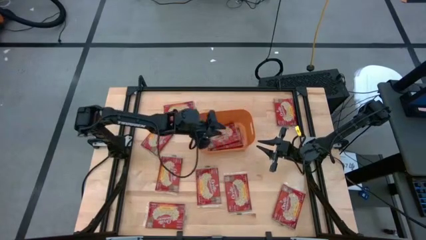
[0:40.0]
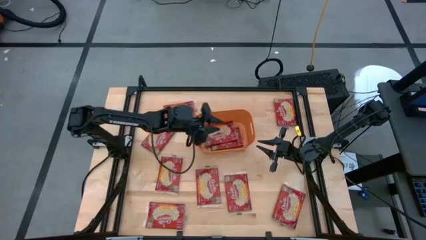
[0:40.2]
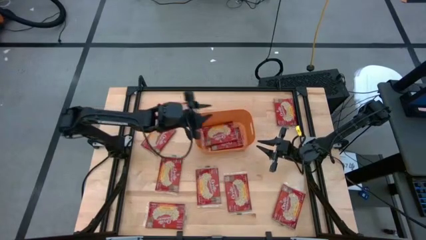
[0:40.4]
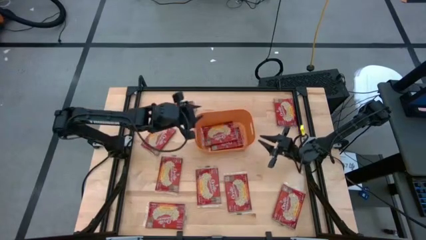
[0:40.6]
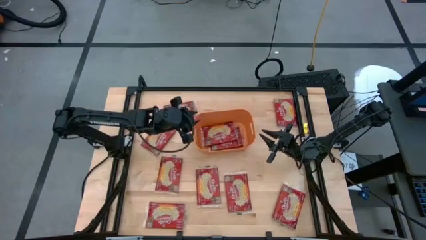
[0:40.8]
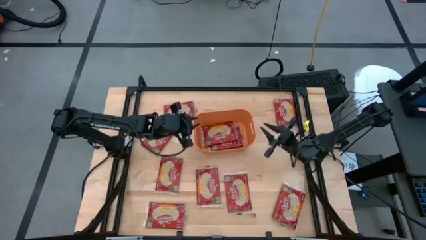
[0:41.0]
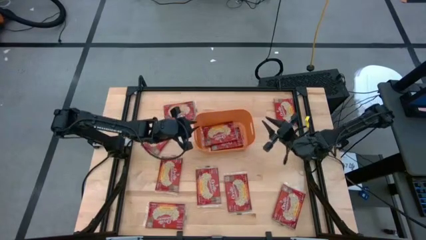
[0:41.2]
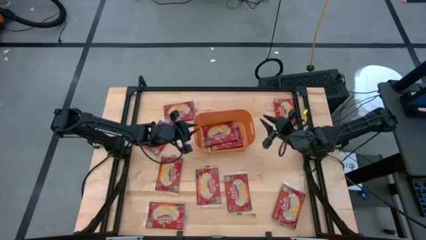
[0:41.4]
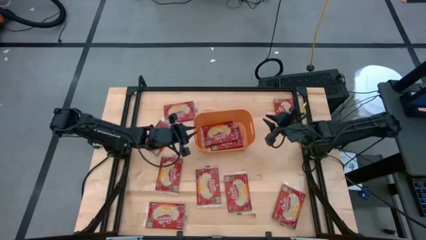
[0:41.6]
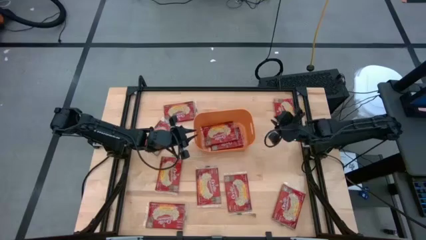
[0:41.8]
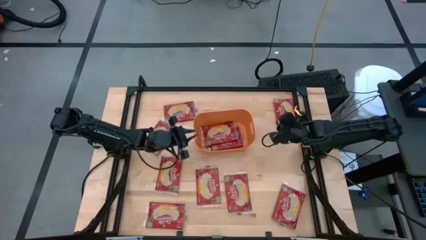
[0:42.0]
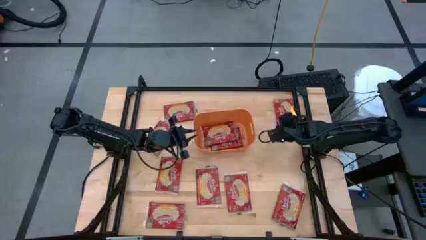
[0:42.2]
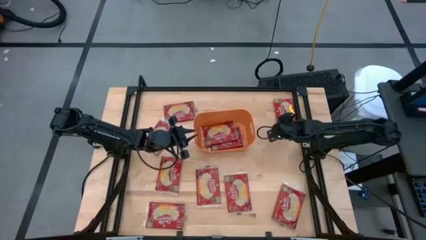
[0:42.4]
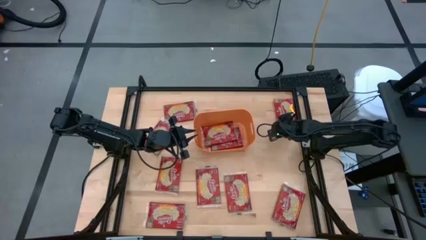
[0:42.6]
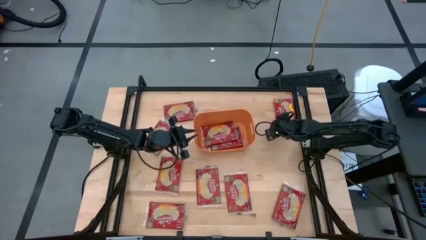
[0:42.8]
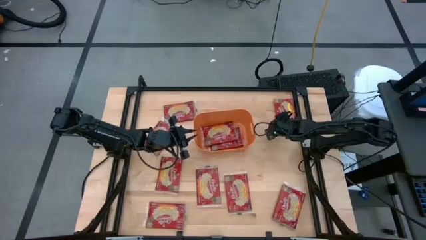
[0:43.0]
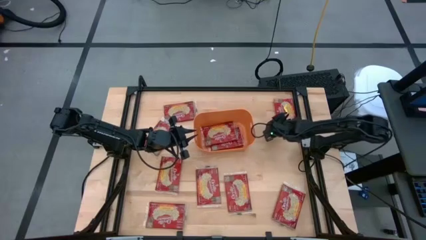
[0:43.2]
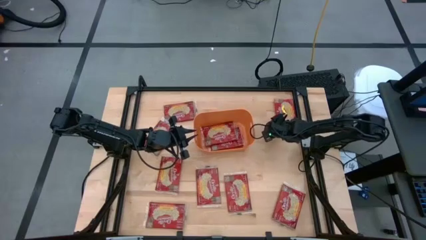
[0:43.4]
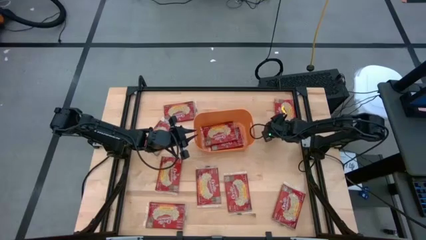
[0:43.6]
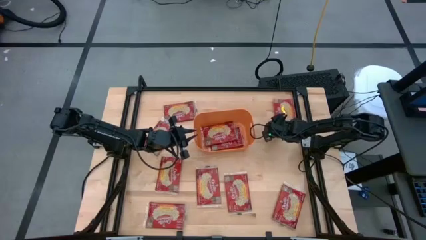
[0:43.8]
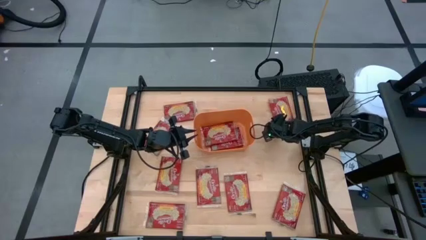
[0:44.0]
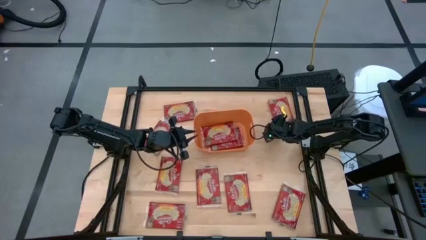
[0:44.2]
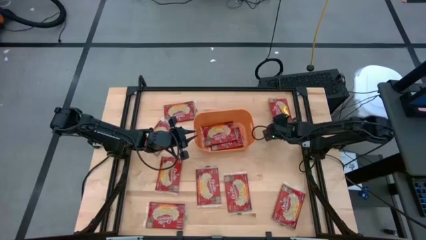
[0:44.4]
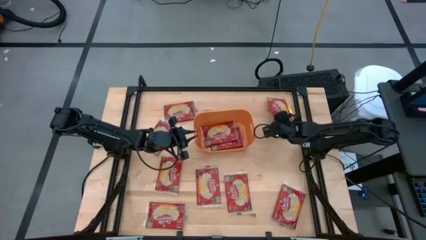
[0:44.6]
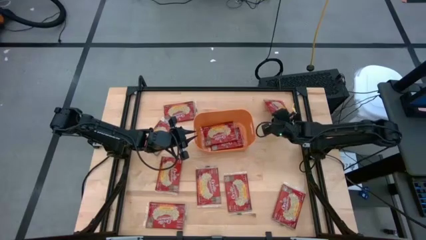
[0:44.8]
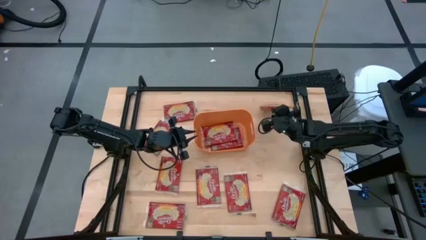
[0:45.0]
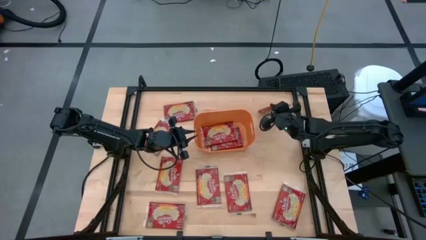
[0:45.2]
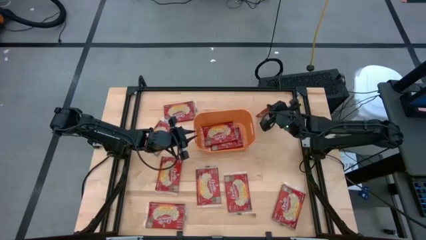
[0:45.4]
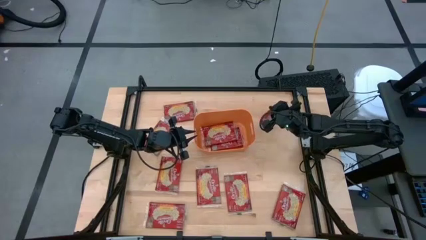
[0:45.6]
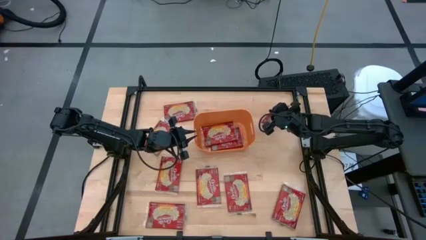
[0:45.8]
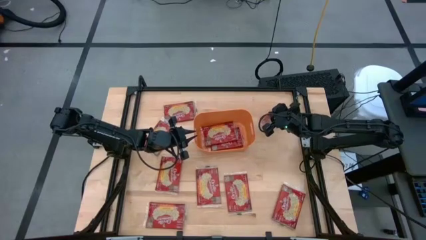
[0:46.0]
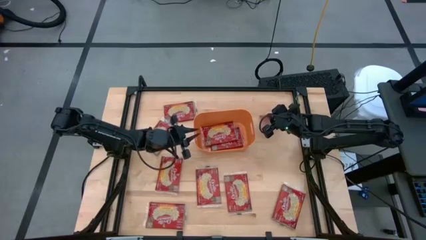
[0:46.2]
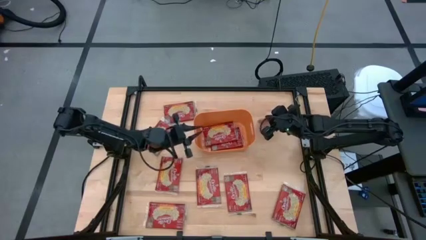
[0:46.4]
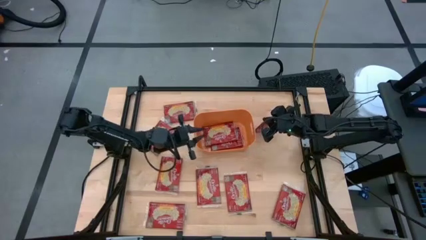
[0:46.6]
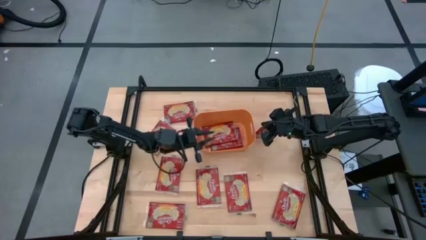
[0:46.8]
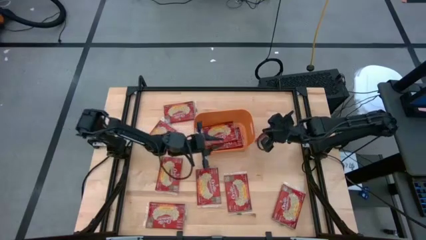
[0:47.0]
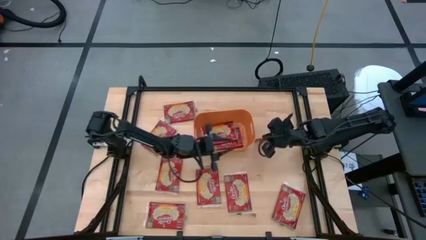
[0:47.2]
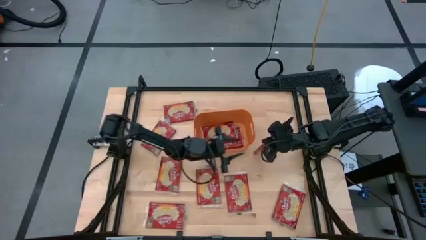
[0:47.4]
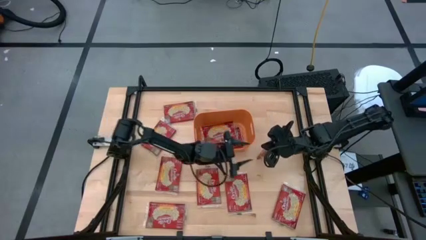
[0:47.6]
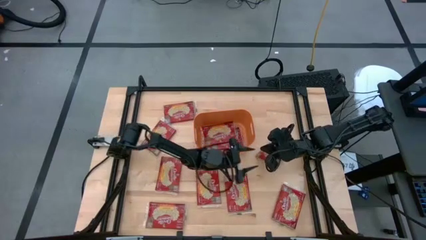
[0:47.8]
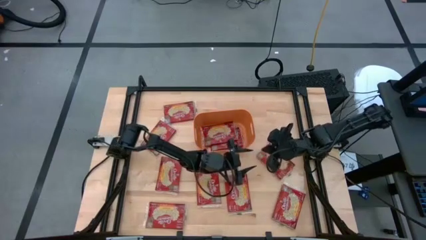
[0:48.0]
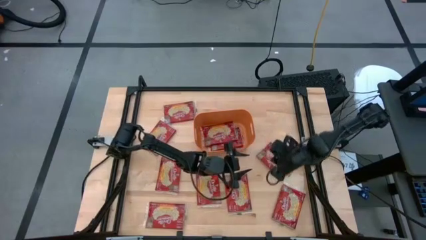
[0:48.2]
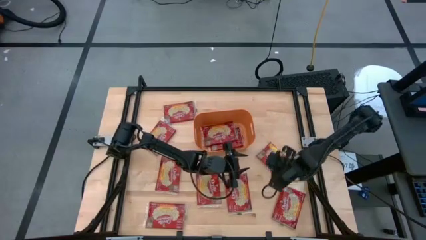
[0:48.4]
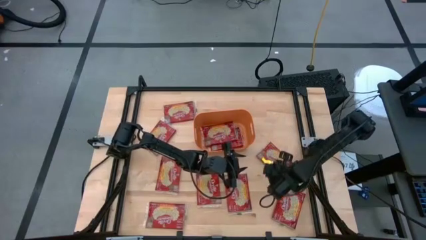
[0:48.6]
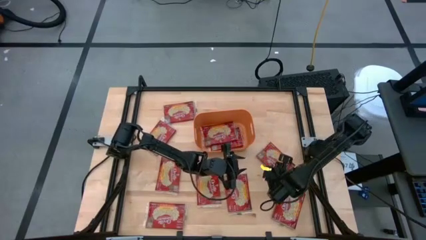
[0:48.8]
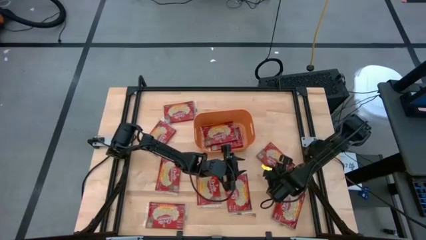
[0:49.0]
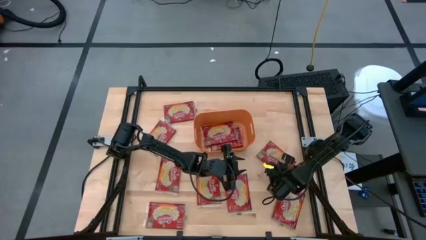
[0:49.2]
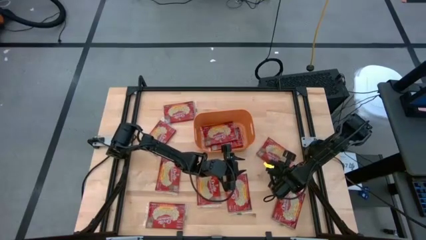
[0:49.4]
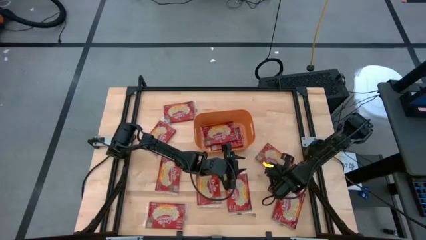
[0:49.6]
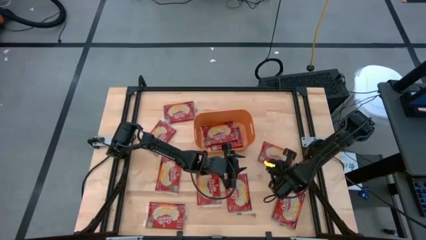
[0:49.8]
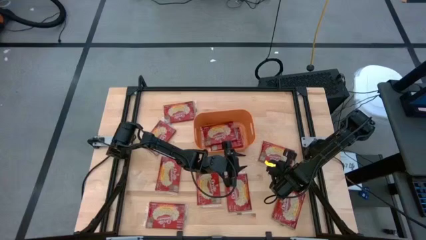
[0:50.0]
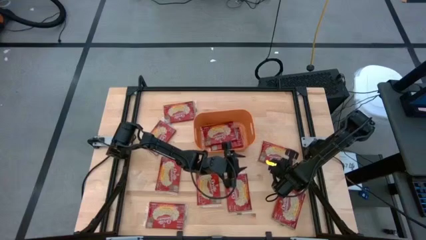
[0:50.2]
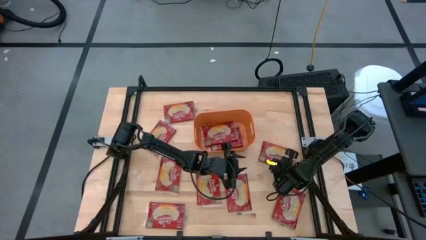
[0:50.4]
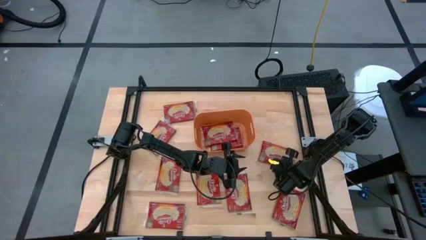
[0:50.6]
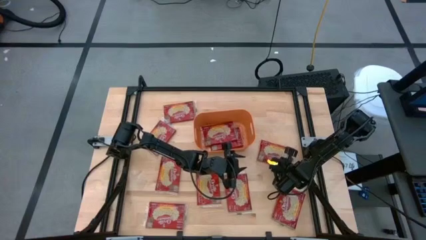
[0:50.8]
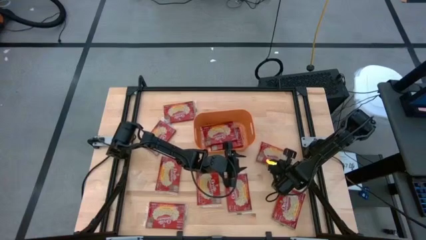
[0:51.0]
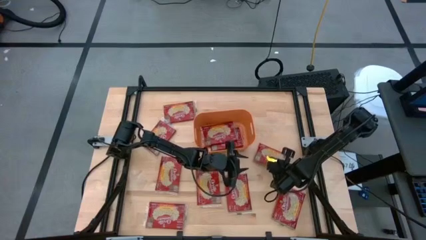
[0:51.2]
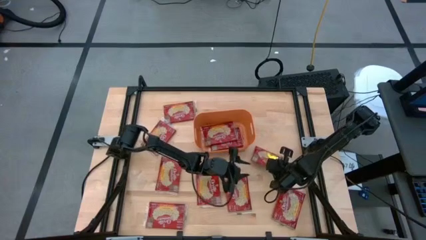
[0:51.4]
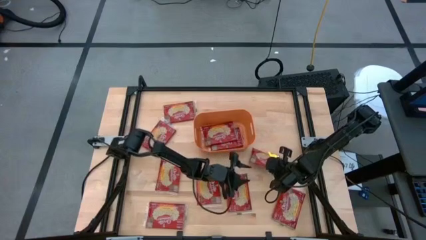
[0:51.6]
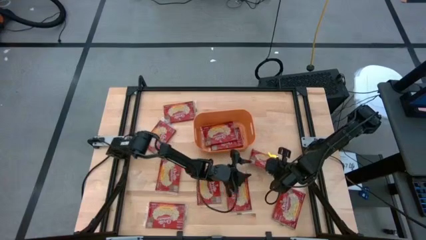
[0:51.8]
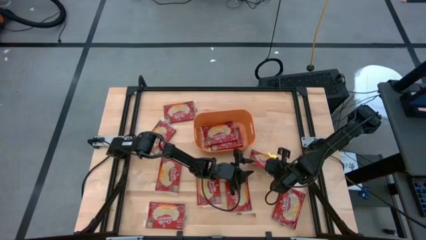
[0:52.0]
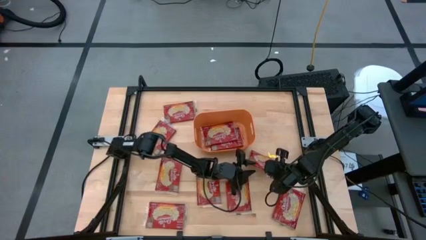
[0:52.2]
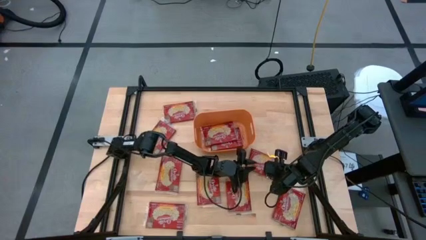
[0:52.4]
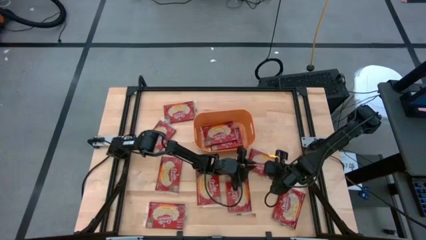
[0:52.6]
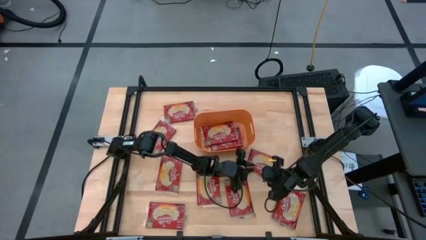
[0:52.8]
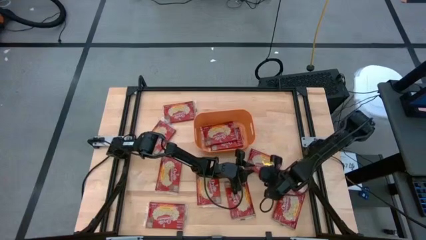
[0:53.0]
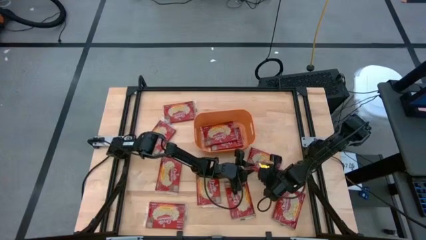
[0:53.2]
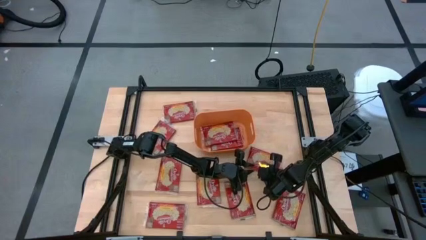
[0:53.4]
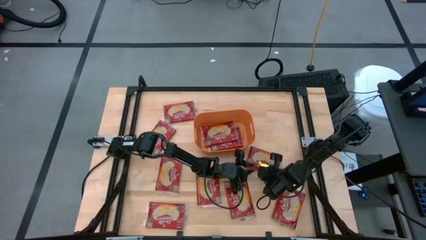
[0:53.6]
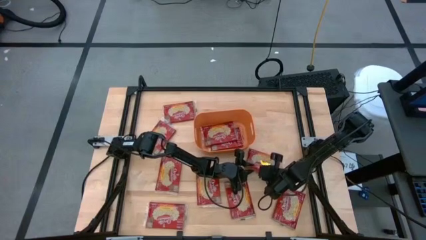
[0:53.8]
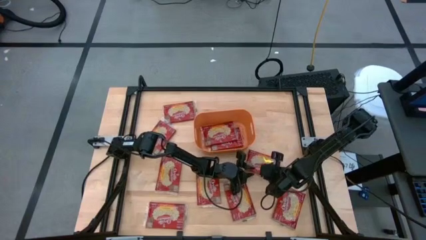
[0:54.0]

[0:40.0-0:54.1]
Task: Sort popcorn bags into baskets
Put the red popcorn bag into the orange bin
